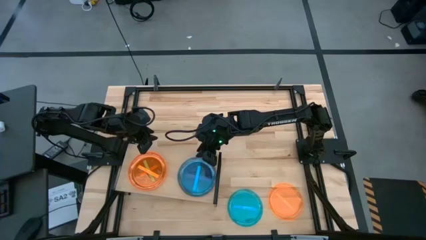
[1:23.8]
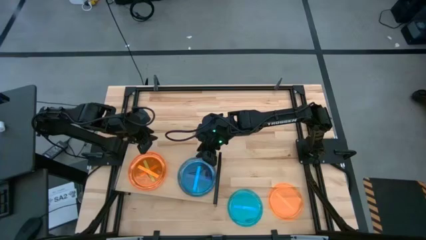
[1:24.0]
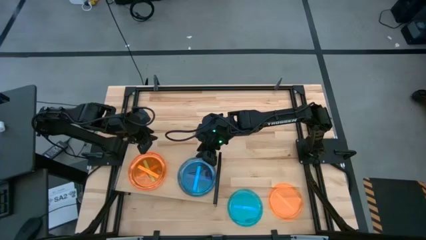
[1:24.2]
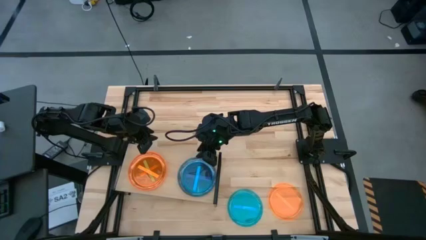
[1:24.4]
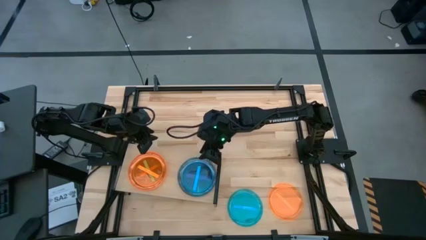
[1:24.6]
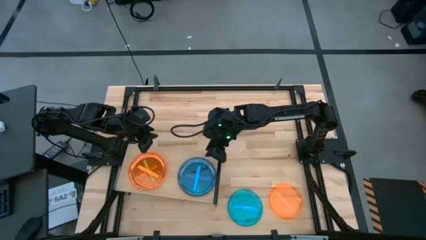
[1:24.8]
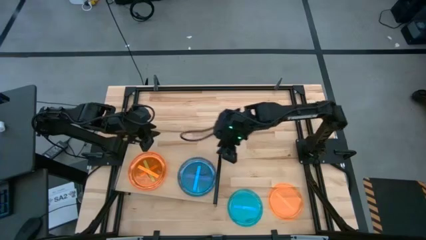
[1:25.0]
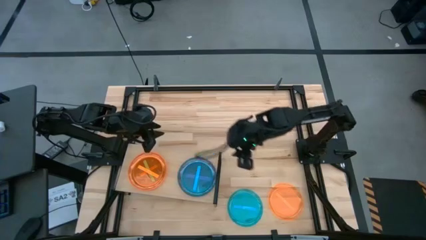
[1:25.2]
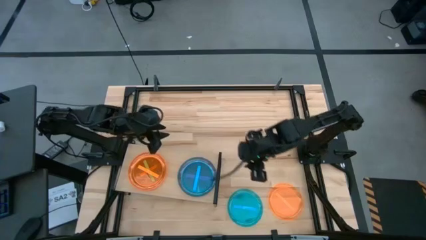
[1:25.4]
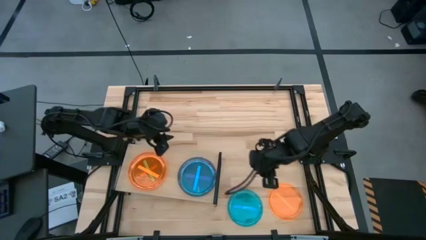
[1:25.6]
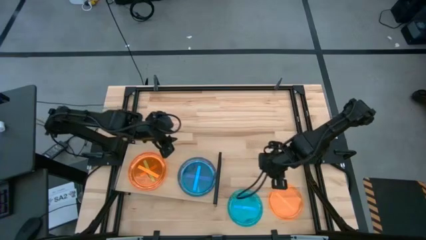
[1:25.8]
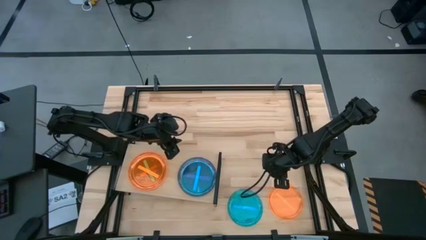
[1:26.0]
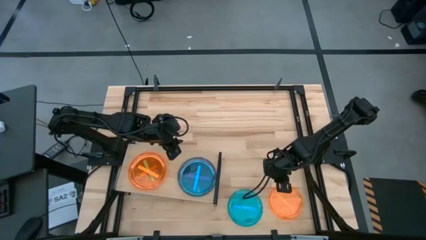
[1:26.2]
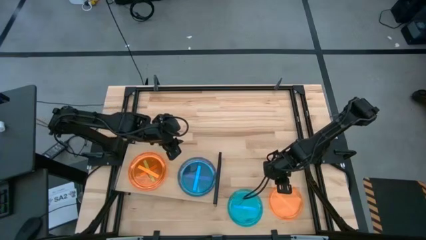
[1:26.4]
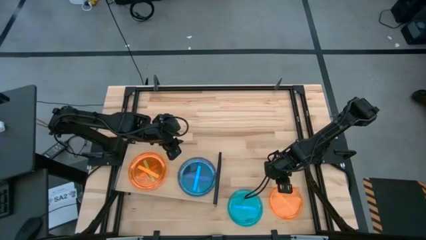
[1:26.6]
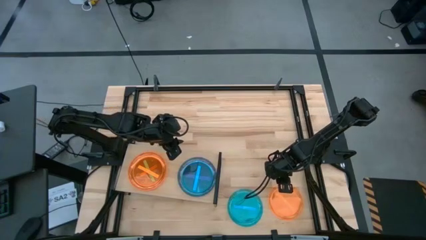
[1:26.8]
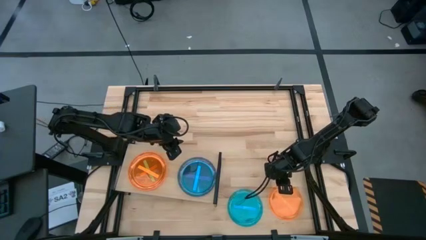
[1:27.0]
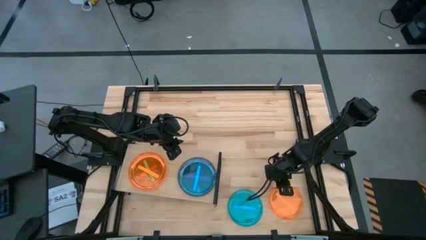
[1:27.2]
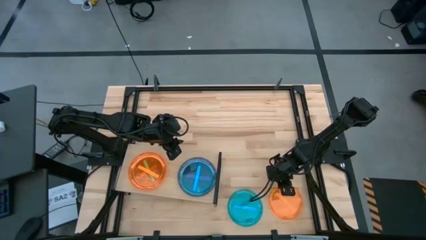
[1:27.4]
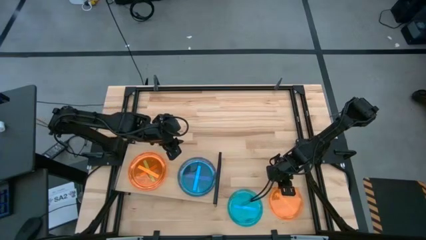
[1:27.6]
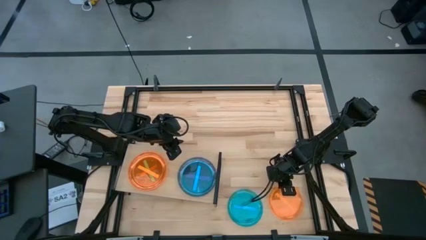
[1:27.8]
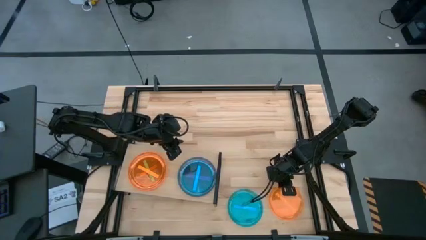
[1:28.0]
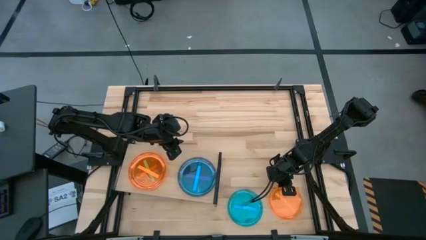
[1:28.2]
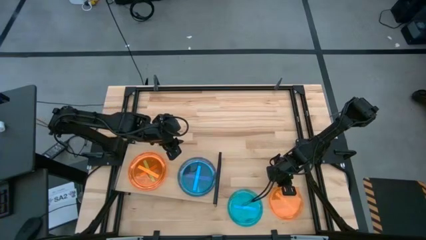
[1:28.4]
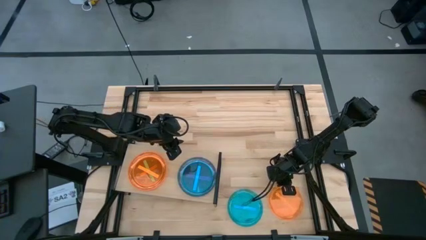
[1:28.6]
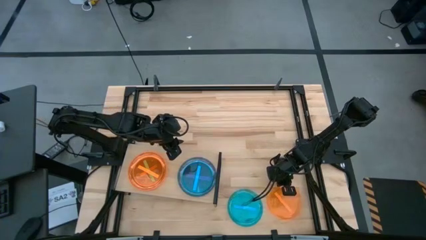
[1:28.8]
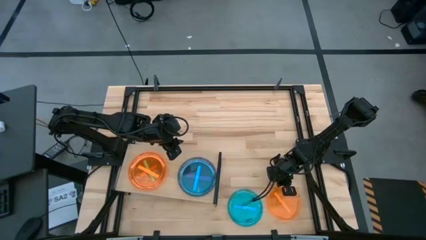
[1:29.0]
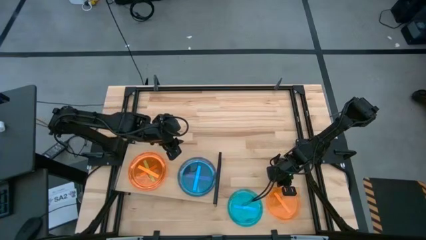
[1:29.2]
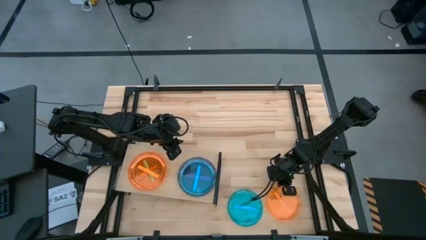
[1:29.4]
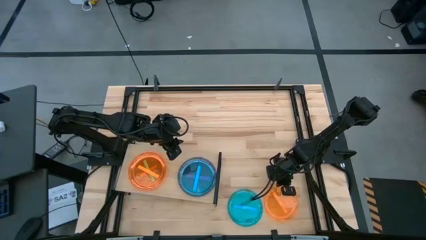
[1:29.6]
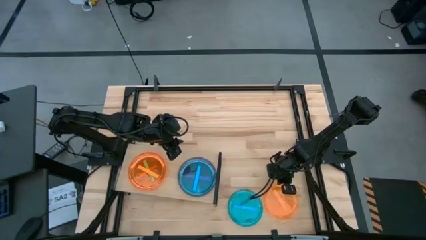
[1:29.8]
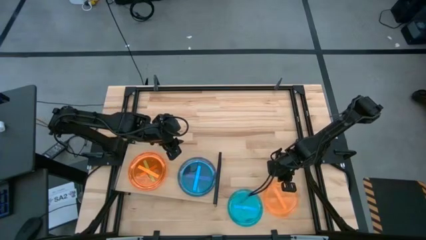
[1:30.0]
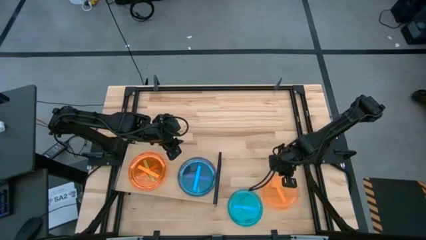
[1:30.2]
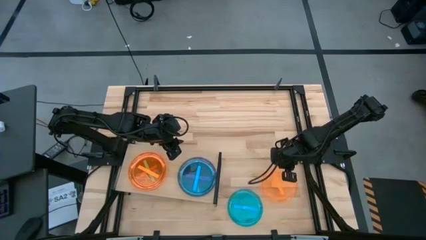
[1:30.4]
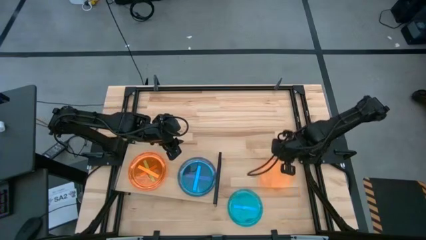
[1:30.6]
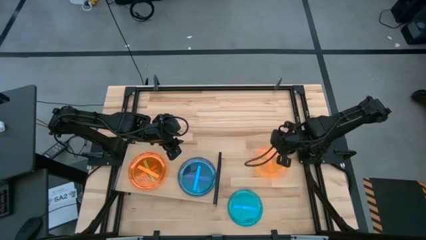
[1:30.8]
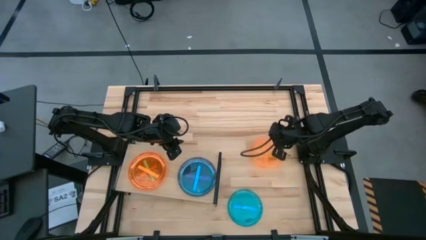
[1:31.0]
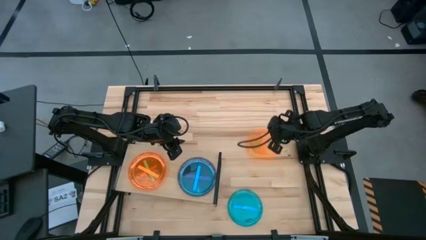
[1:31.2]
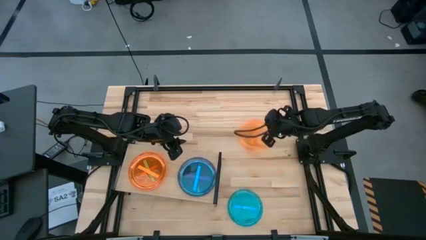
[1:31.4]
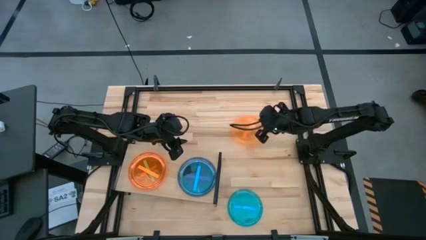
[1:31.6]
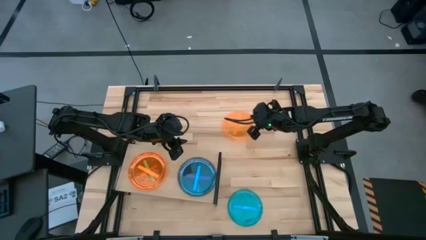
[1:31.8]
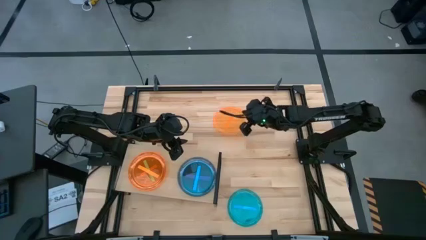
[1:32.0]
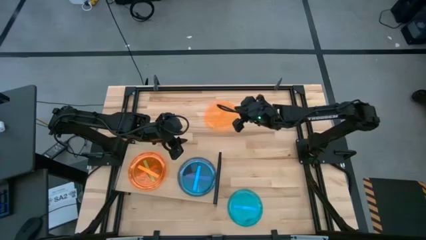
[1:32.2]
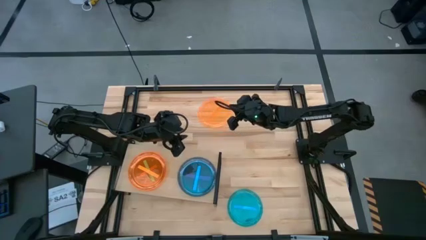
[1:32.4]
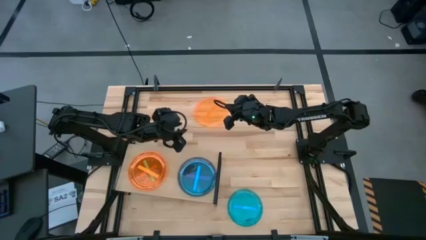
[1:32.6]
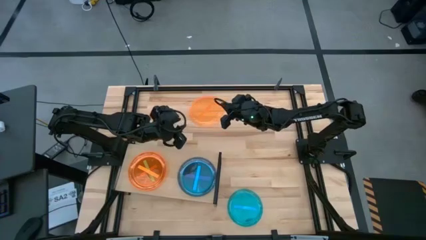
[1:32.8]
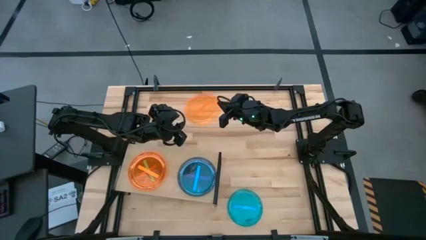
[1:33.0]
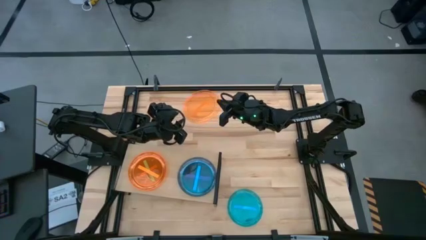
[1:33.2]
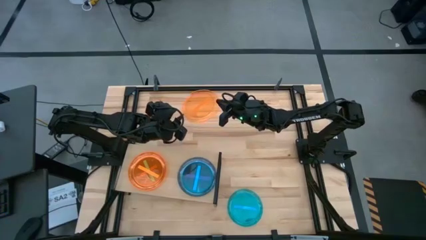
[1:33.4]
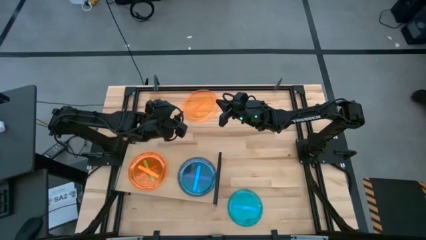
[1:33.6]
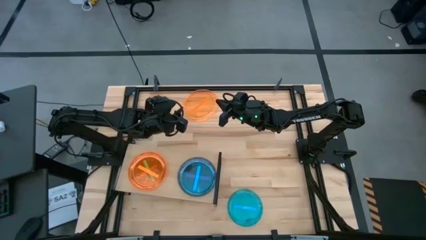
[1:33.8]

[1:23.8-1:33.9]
Task: Place and stack plates onto a shelf
Stack the orange plate on top of the other orange plate on the shelf

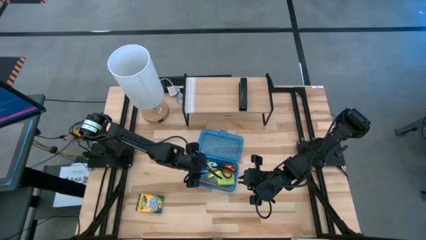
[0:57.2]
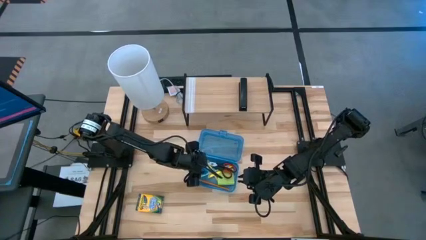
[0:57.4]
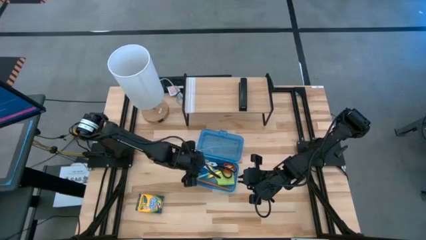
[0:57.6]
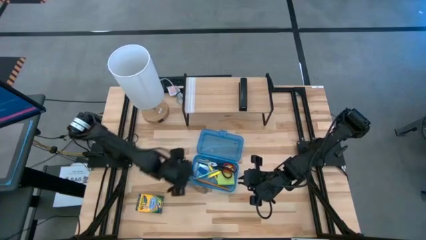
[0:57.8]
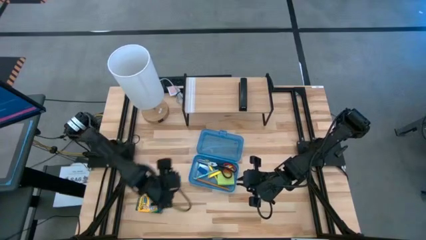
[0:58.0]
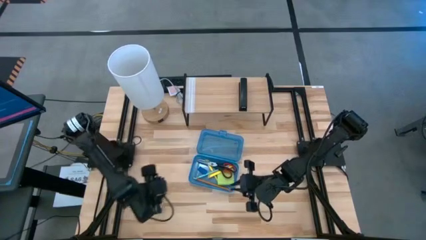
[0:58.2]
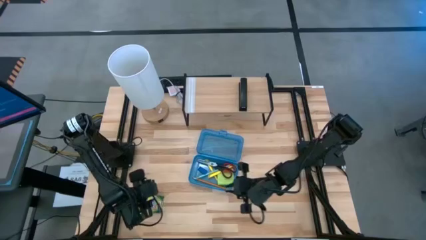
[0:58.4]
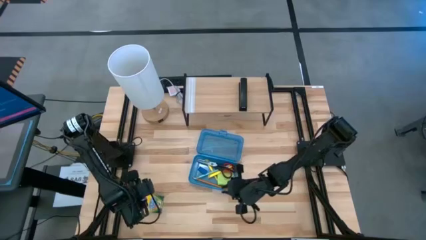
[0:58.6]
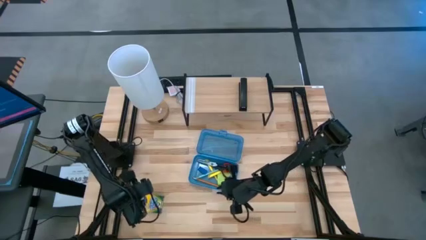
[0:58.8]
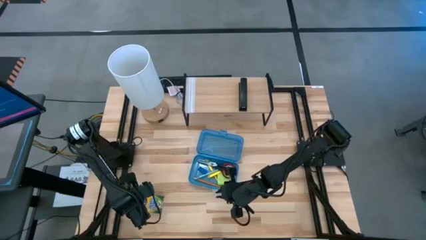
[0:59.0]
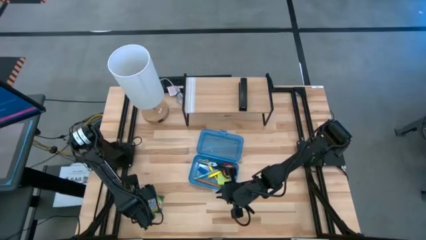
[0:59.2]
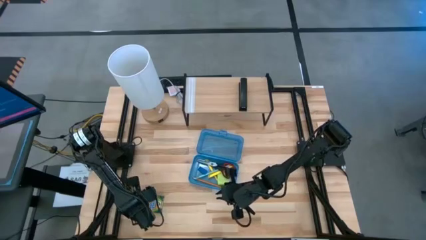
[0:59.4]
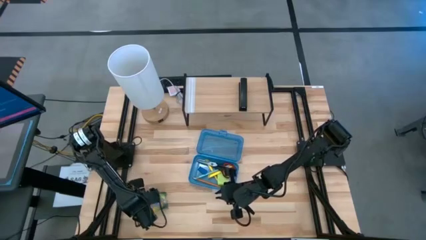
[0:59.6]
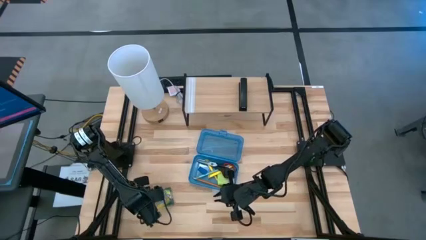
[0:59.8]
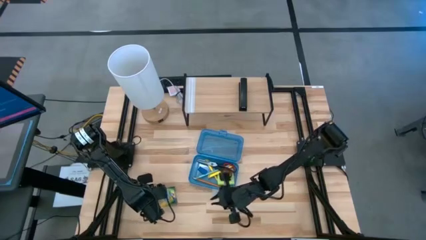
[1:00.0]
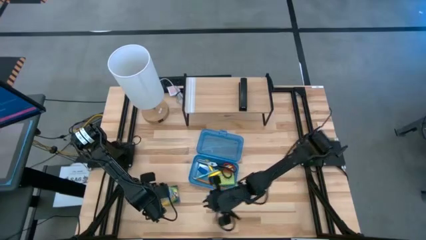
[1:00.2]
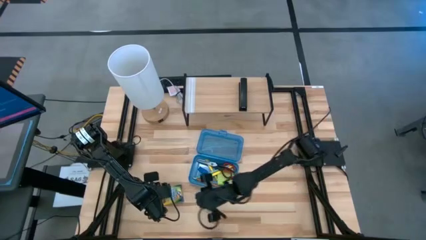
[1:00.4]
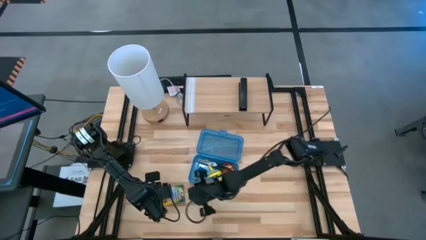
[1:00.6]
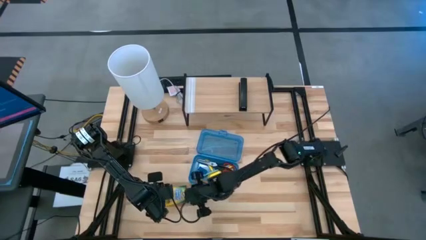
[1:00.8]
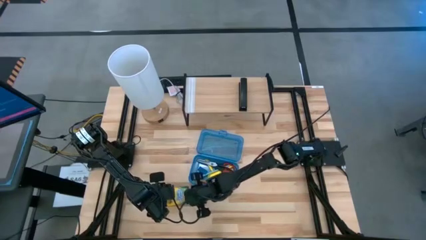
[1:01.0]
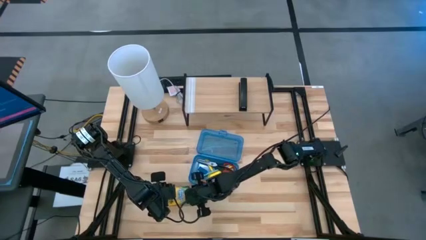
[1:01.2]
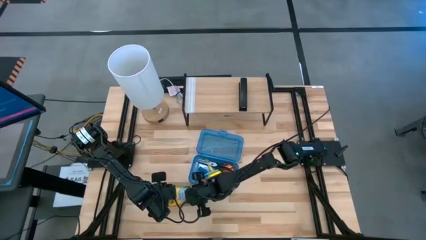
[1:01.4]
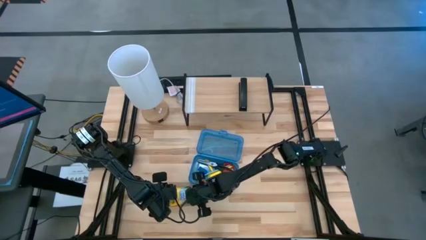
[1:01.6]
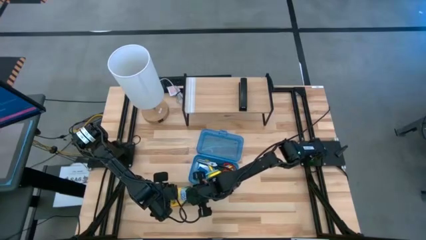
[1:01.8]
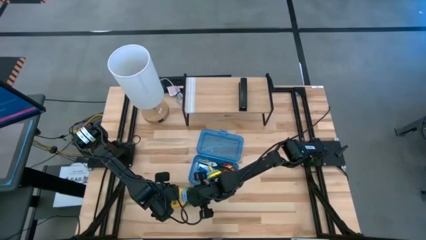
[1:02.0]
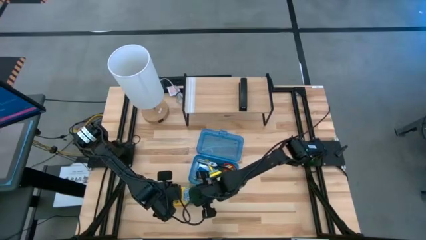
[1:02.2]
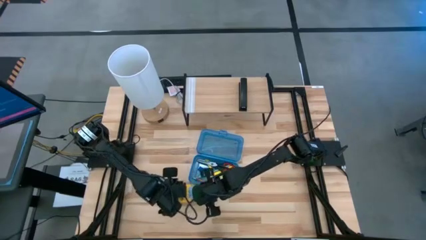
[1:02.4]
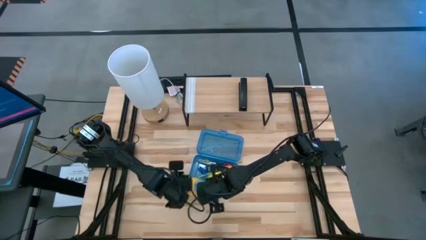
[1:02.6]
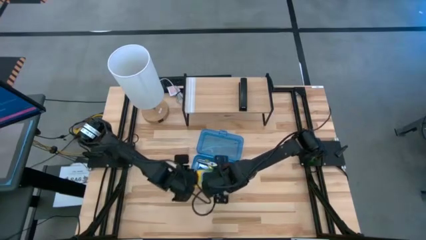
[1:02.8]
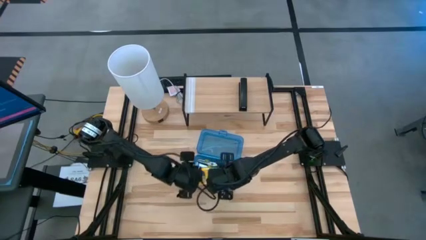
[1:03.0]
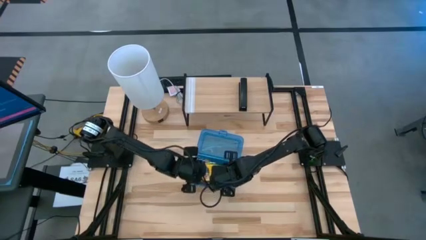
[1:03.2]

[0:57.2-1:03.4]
Task: Pack school essentials
Put the yellow crayon box into the blue supply box
